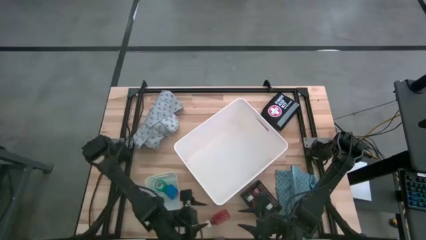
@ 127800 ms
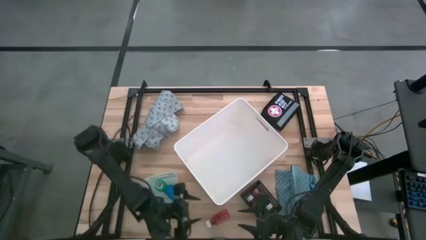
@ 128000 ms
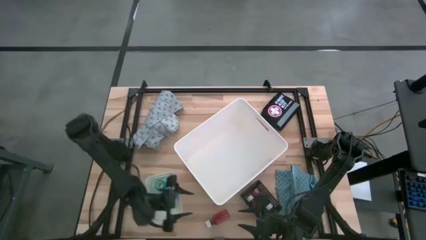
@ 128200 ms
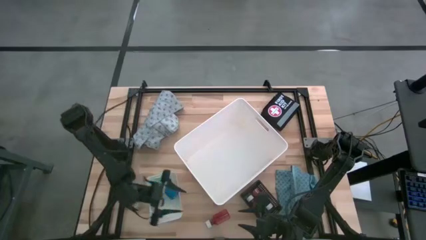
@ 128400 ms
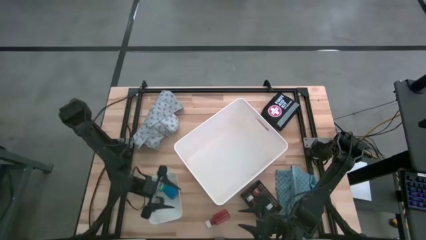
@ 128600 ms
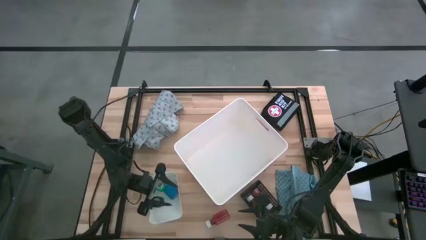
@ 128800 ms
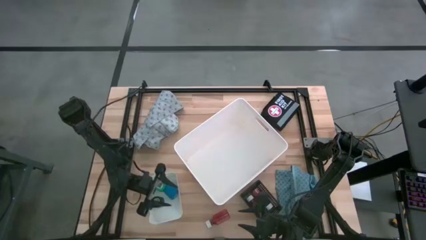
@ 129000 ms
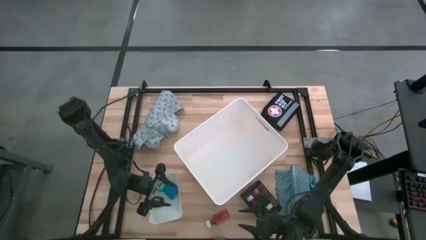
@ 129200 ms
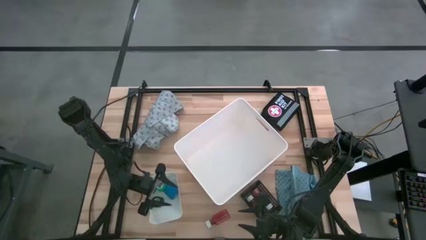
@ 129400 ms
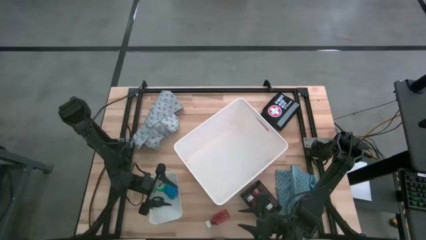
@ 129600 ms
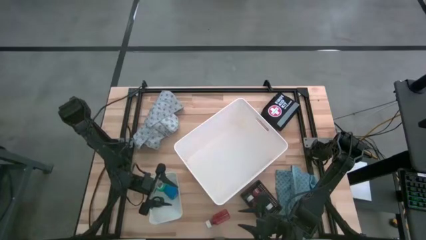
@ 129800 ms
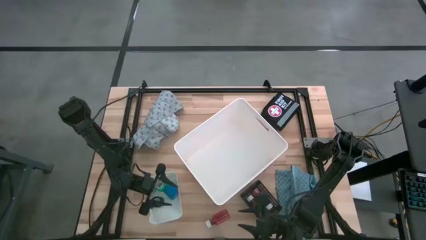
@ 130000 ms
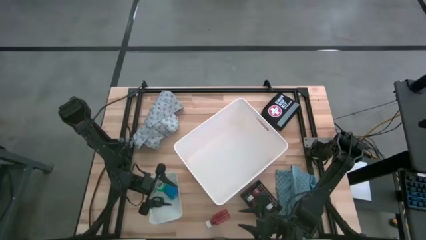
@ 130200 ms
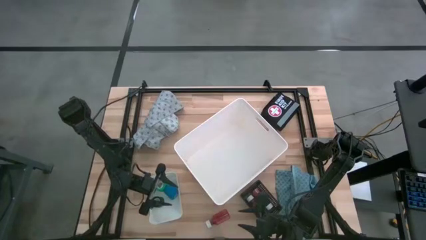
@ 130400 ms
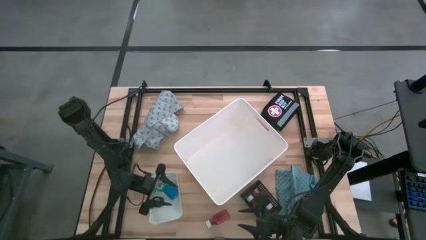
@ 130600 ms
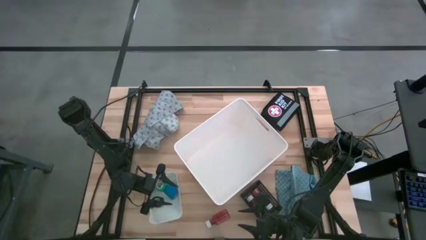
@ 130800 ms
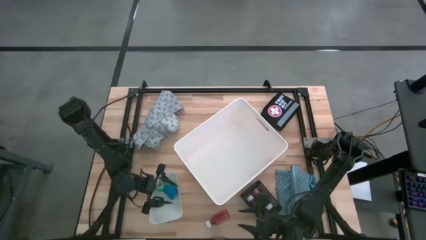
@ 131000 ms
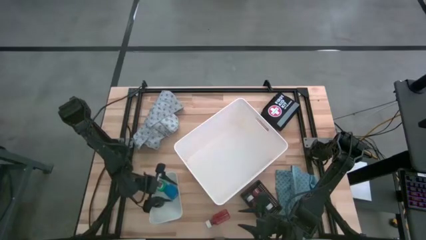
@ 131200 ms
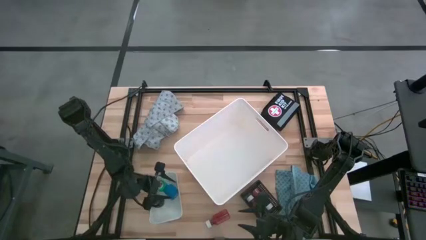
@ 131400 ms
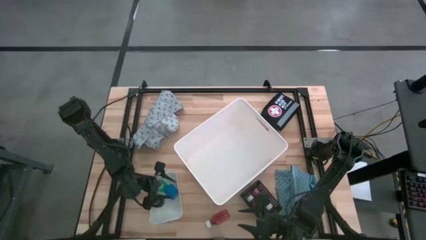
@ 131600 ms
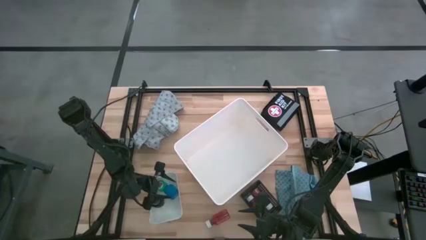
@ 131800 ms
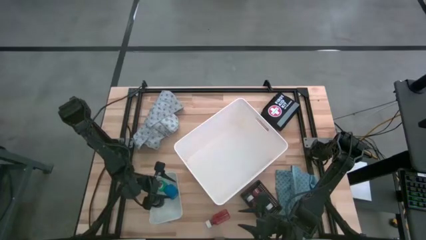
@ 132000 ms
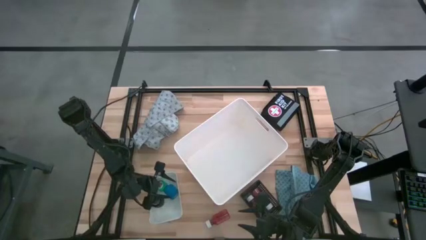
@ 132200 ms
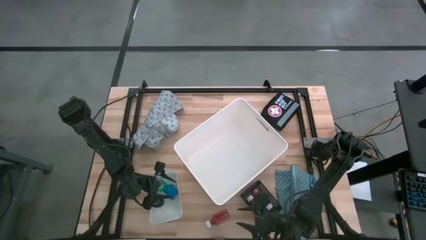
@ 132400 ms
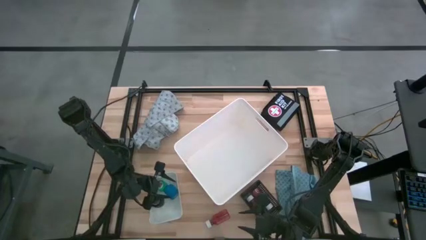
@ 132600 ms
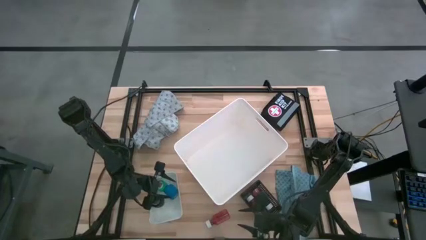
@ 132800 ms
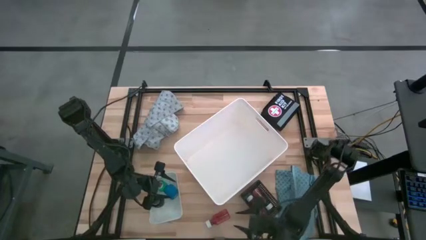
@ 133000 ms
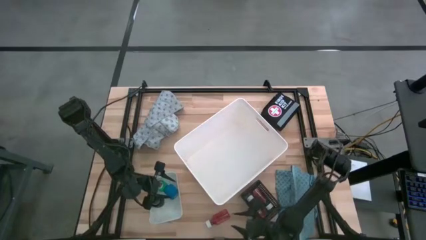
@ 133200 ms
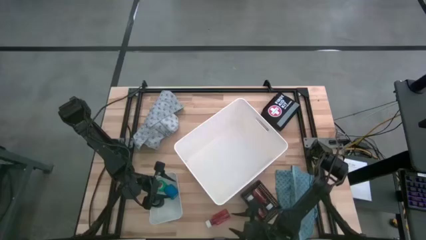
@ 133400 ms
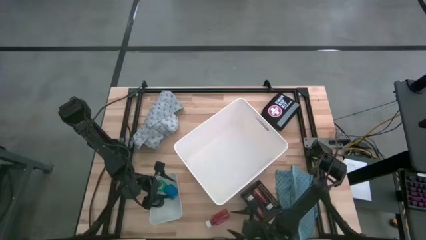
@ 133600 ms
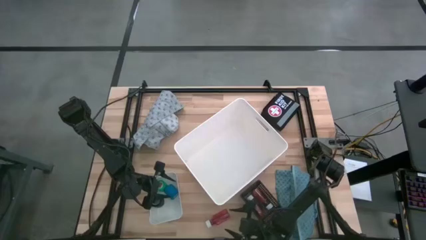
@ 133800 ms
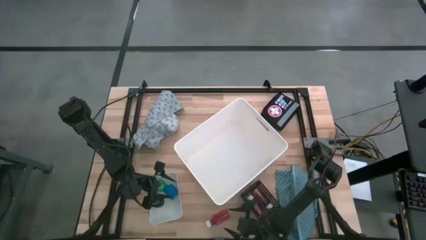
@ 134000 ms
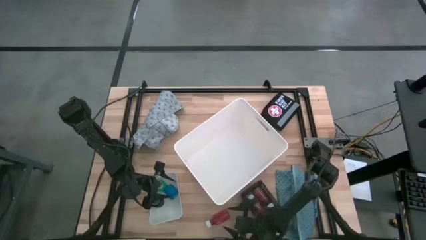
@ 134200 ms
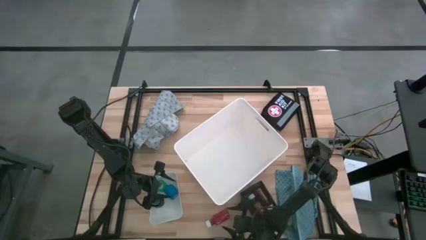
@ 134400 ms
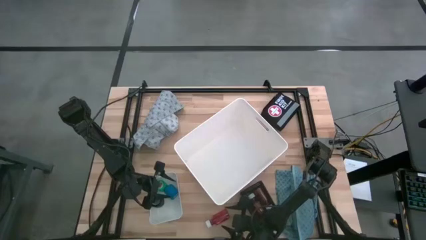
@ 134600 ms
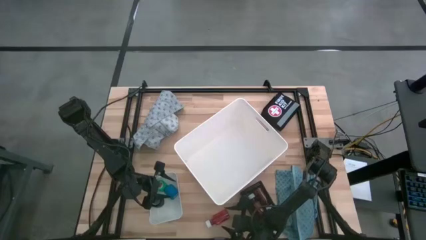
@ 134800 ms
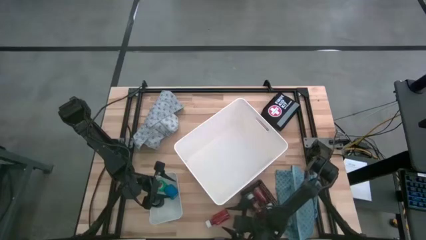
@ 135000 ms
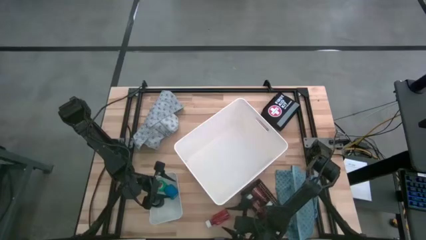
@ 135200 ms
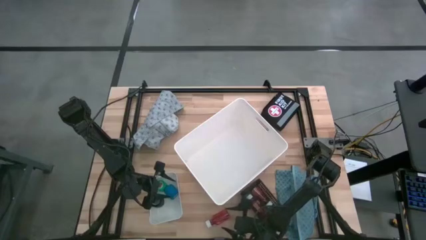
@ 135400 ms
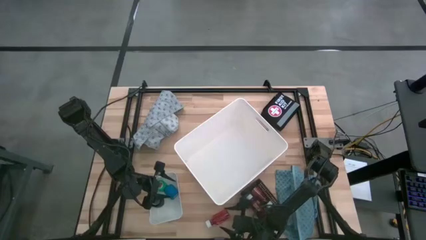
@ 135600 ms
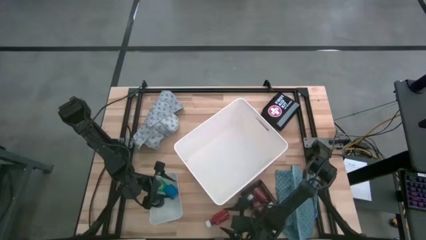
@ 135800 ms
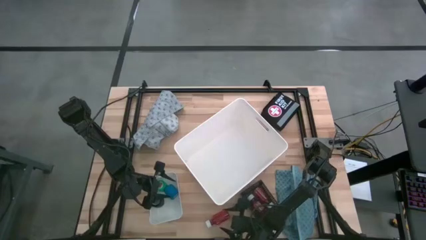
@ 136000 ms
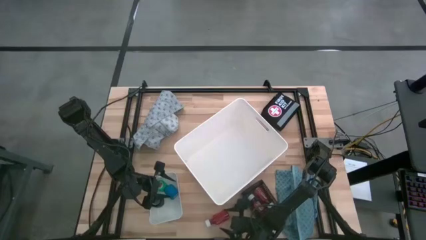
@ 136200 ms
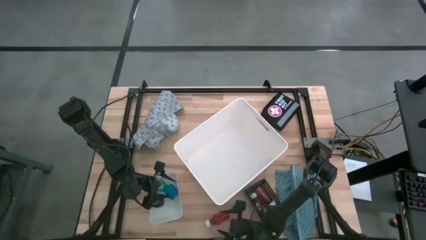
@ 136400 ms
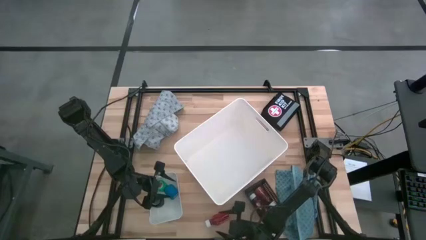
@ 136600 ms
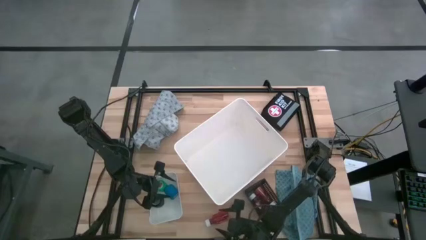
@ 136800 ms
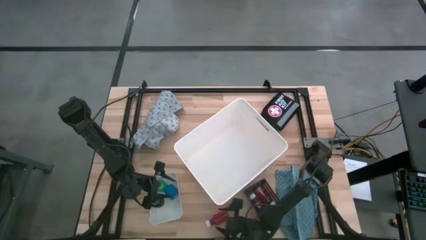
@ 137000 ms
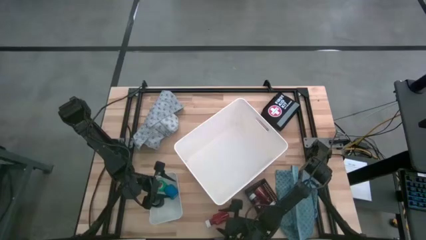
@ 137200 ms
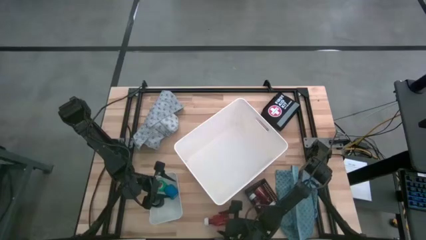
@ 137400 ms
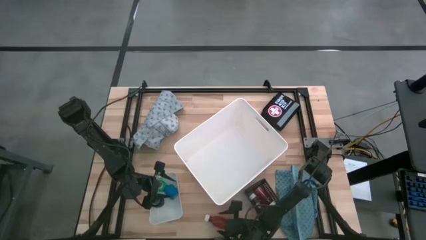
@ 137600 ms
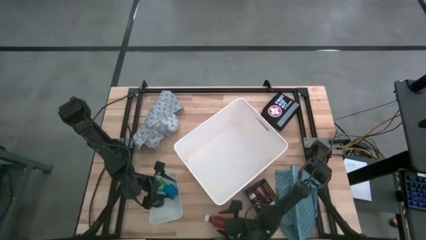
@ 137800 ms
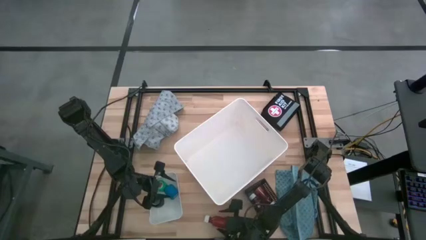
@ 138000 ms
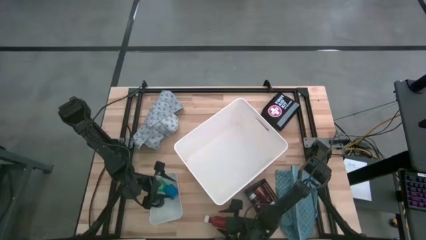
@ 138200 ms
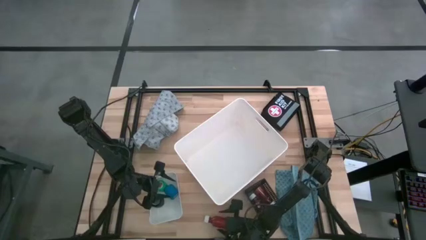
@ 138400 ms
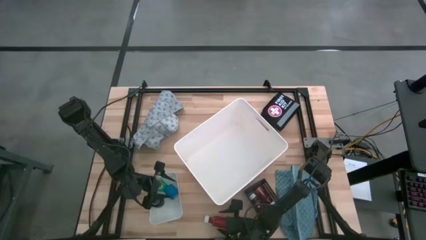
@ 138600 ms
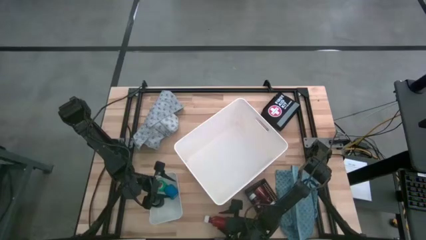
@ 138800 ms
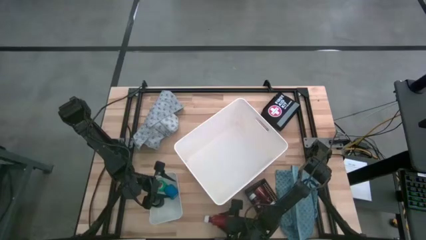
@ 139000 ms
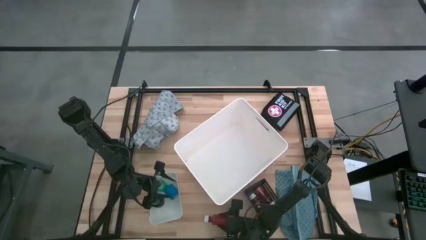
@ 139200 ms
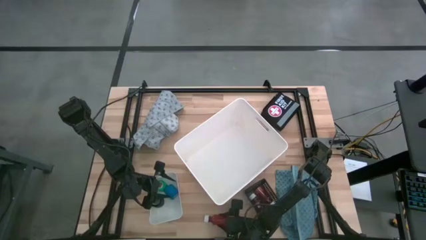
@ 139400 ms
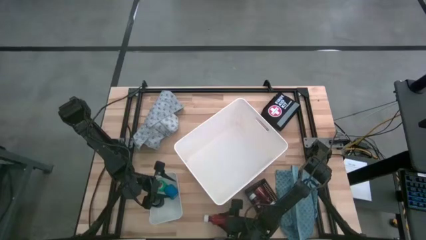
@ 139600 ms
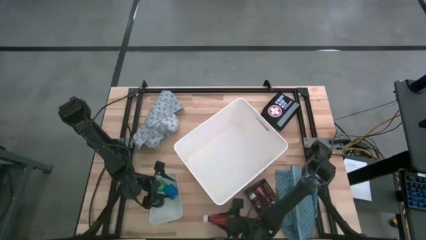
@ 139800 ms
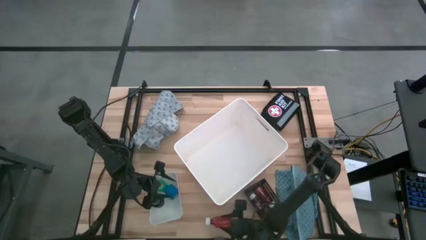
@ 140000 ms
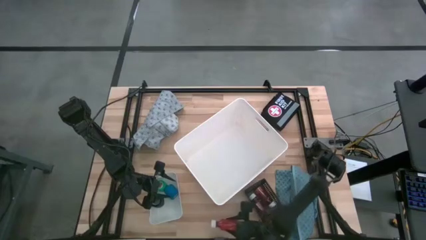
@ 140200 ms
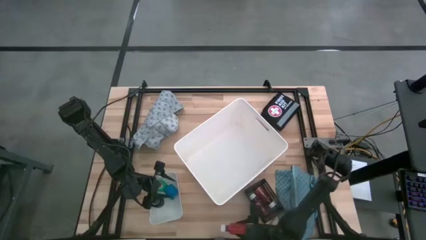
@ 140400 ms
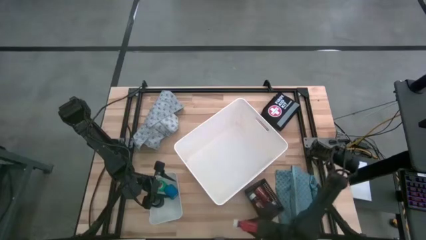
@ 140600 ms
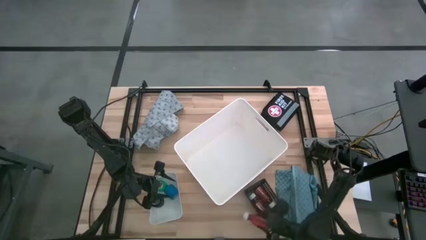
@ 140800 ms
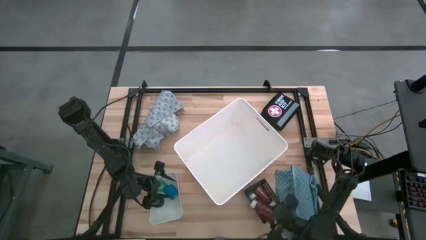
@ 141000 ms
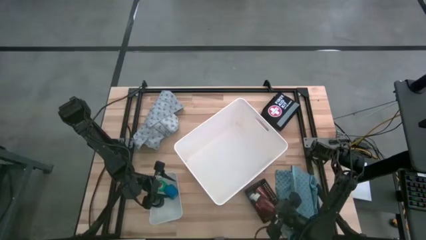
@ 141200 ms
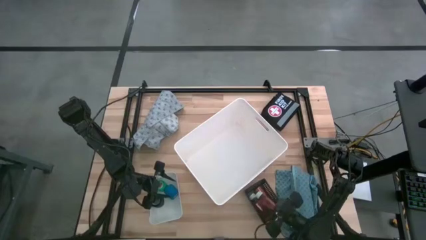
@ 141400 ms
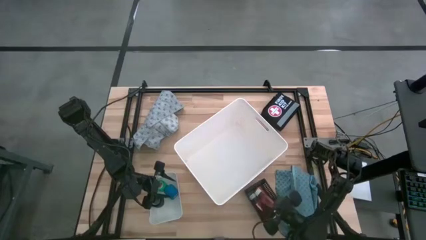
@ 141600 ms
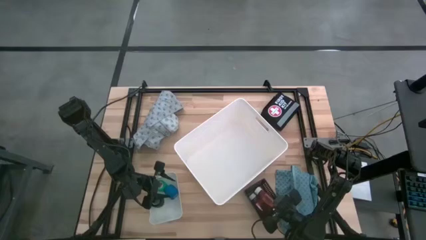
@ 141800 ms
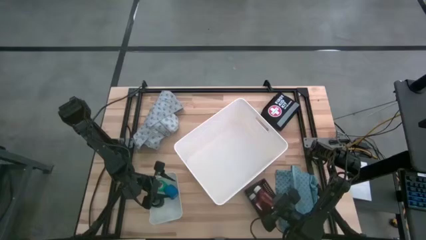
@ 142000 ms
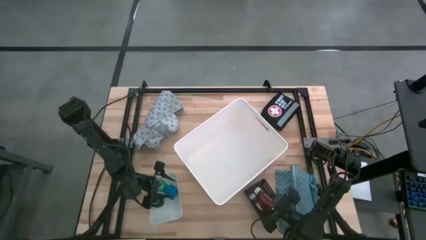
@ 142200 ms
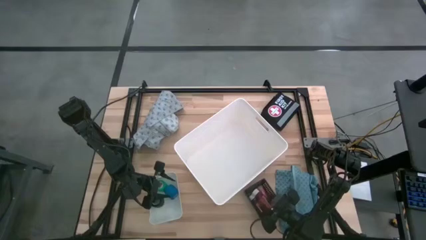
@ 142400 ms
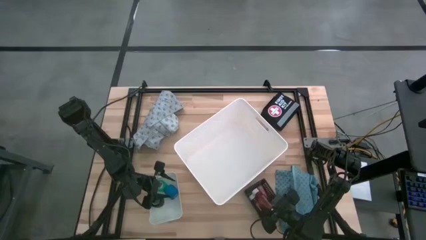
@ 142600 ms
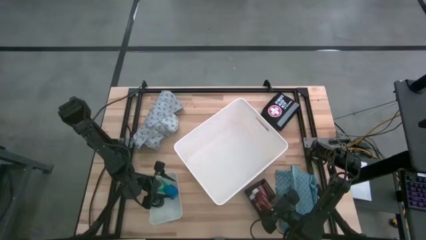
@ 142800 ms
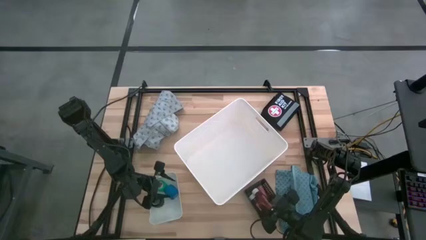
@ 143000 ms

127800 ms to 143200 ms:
Task: Pick & place medical supplies in basket/bin
Put the orange bottle into the black basket

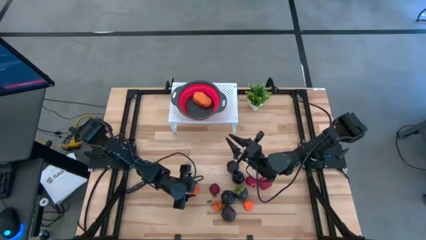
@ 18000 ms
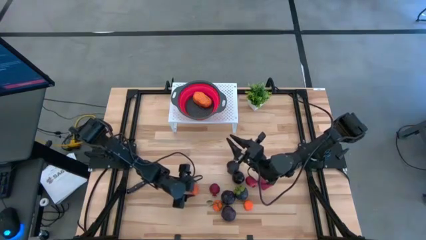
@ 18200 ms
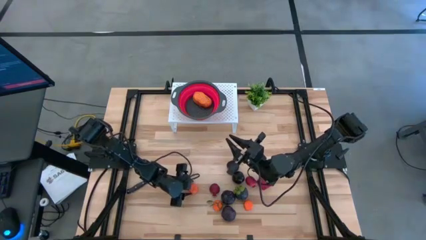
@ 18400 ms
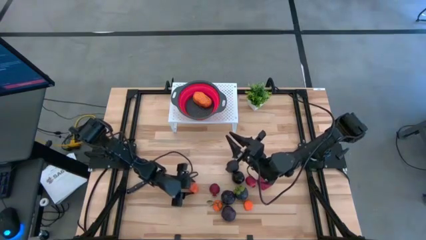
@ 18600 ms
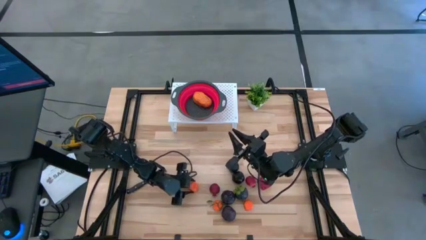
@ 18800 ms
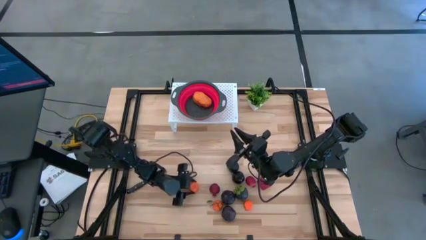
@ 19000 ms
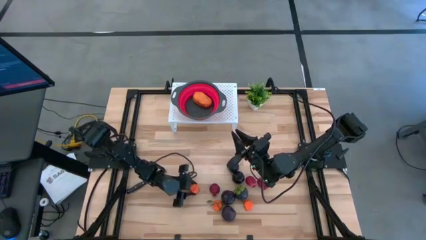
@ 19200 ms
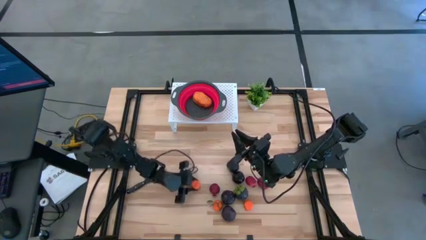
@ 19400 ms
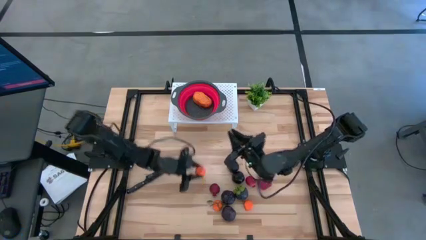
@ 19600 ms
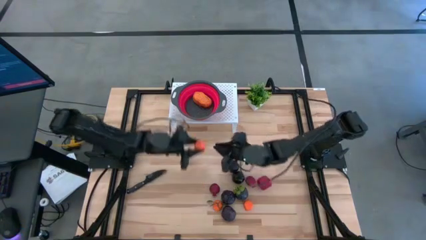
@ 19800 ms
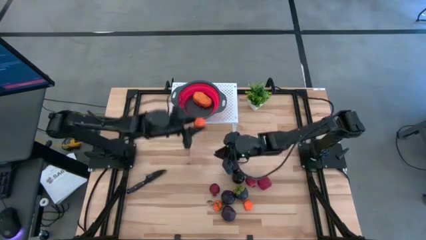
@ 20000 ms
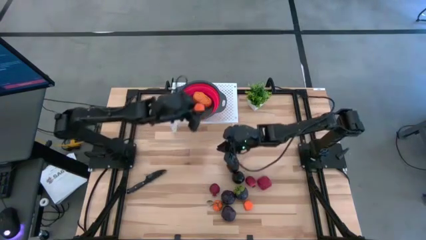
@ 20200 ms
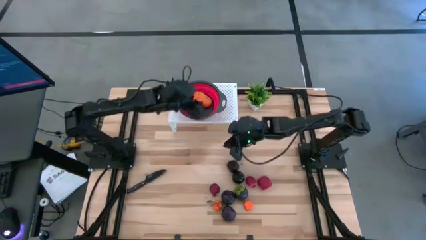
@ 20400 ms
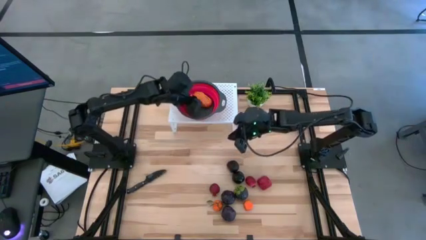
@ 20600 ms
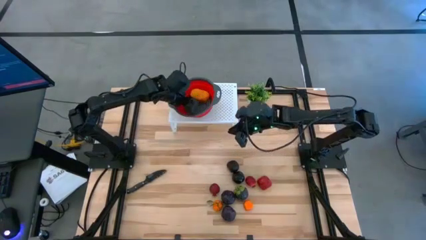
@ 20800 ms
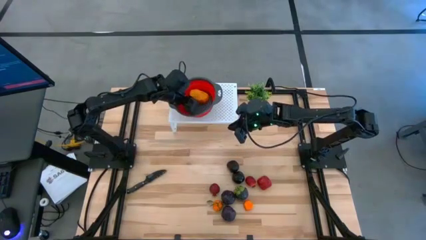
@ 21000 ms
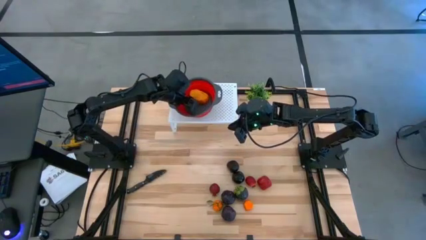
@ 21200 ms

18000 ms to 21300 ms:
Task: Pick & Place Fruit
Put the orange into the red strainer bowl on the shelf
